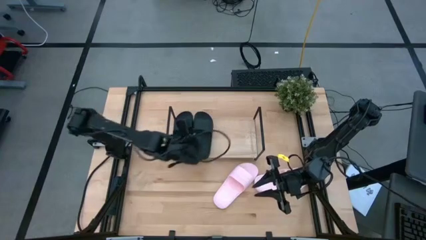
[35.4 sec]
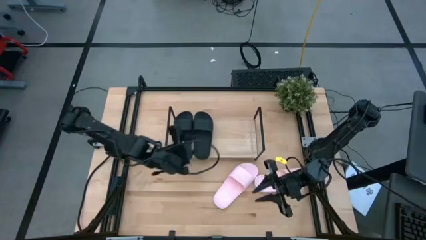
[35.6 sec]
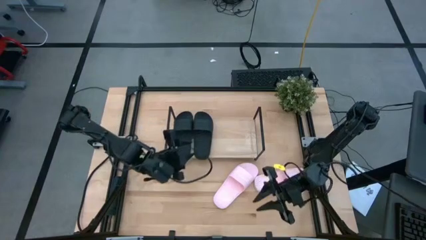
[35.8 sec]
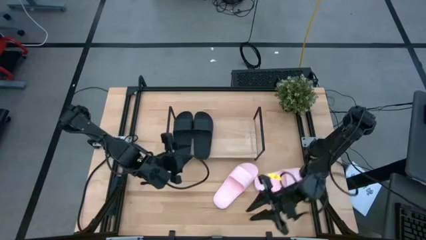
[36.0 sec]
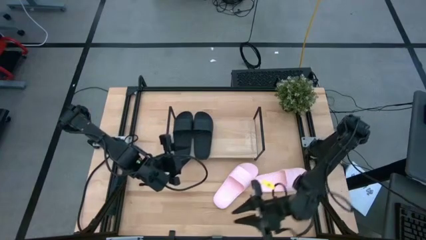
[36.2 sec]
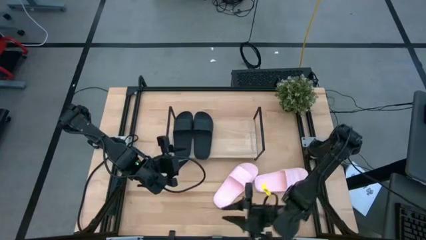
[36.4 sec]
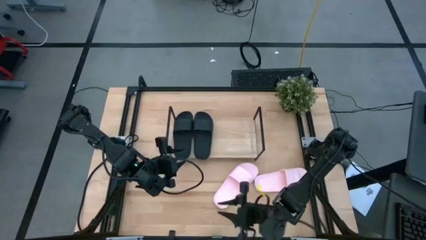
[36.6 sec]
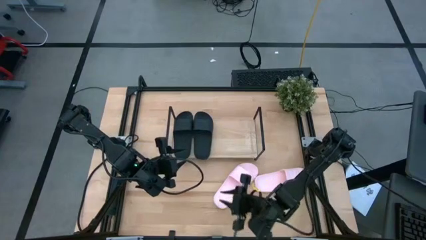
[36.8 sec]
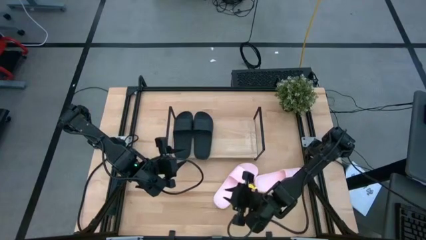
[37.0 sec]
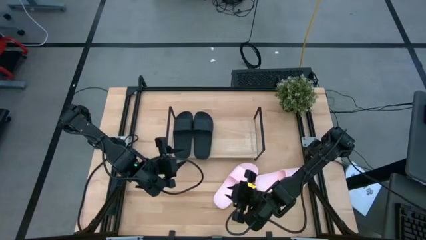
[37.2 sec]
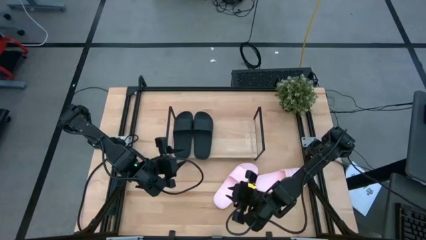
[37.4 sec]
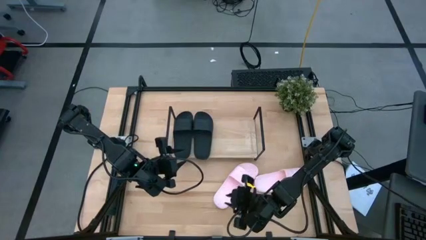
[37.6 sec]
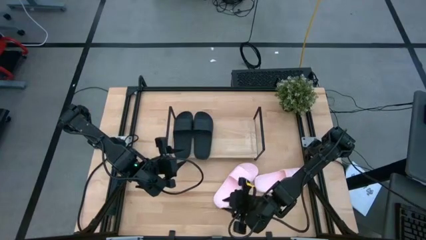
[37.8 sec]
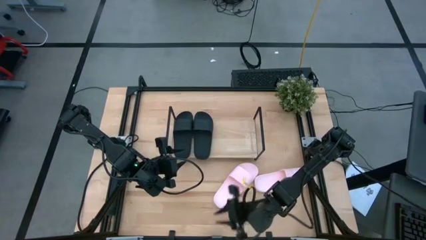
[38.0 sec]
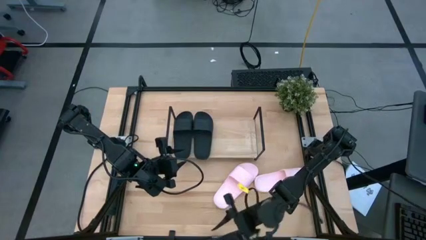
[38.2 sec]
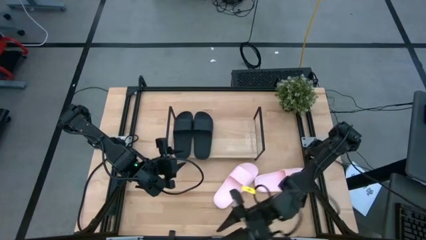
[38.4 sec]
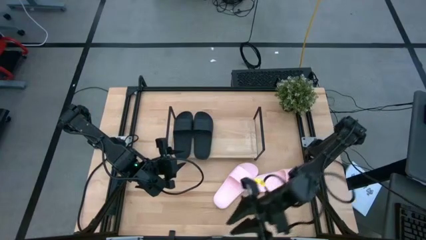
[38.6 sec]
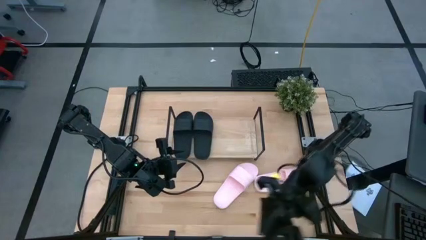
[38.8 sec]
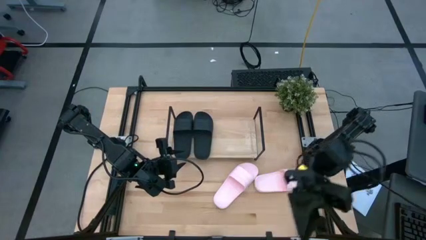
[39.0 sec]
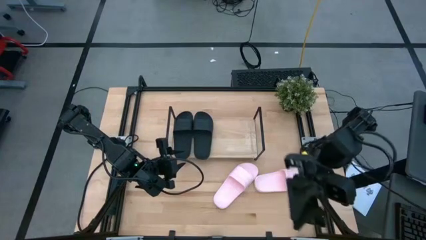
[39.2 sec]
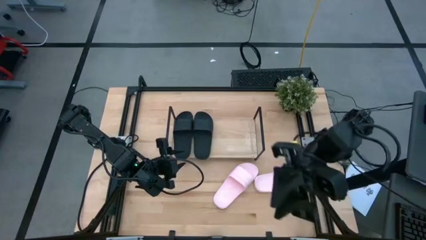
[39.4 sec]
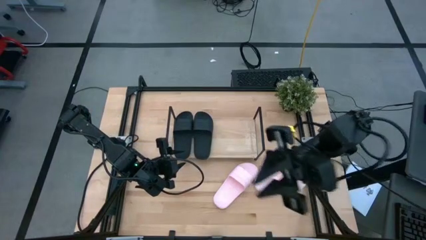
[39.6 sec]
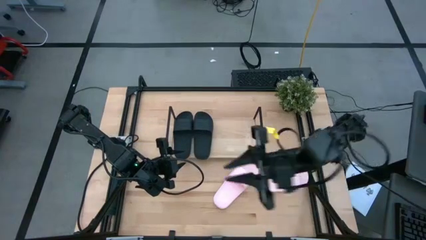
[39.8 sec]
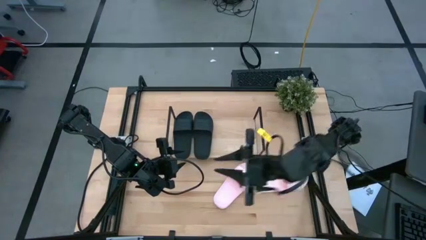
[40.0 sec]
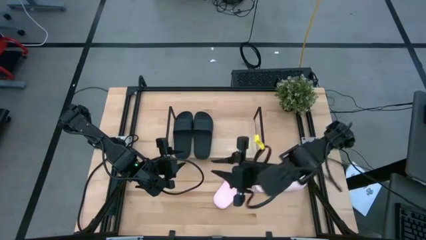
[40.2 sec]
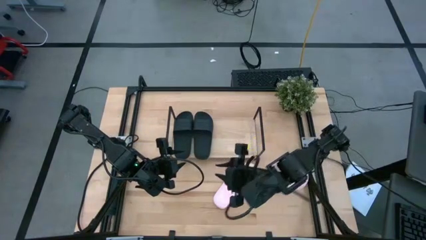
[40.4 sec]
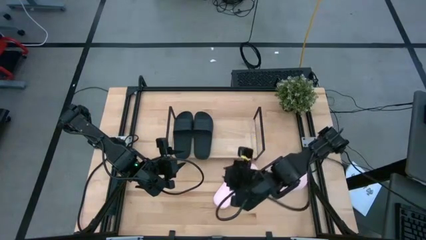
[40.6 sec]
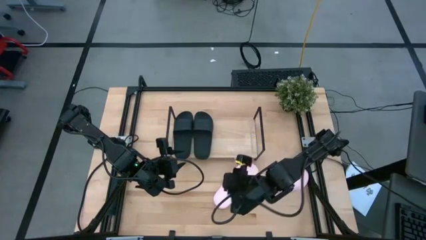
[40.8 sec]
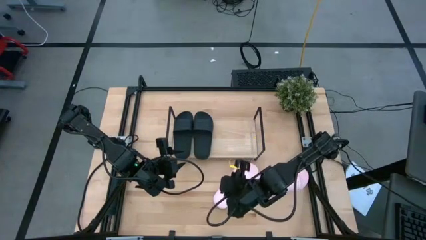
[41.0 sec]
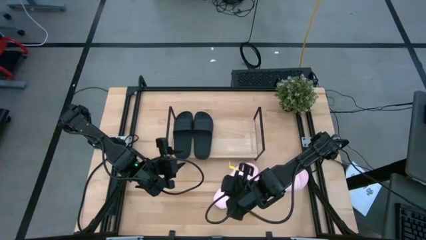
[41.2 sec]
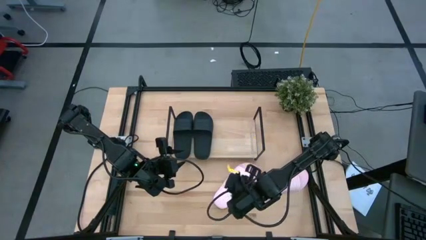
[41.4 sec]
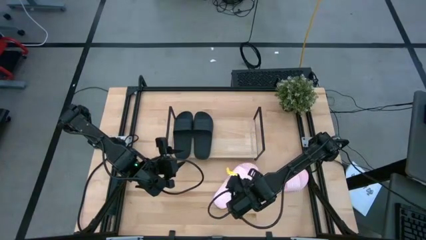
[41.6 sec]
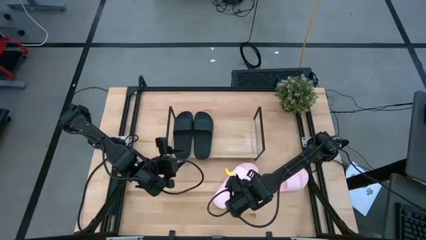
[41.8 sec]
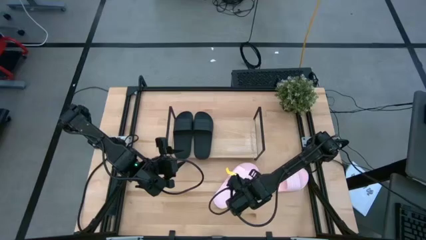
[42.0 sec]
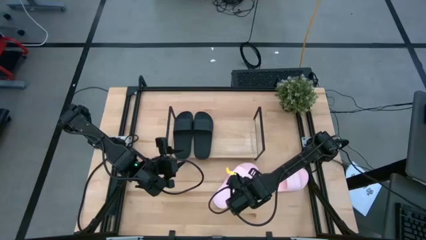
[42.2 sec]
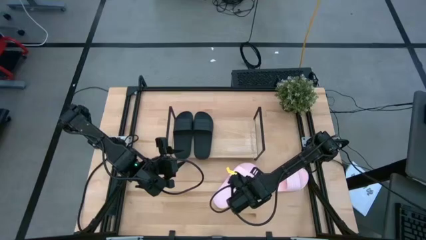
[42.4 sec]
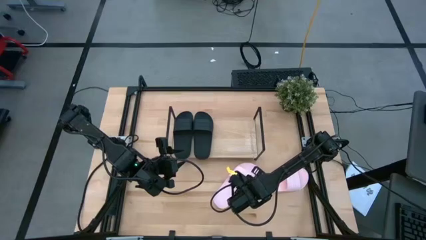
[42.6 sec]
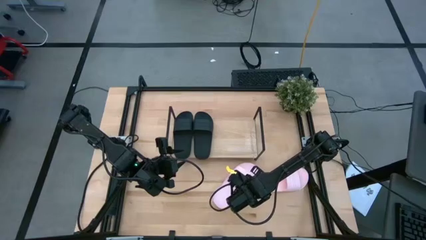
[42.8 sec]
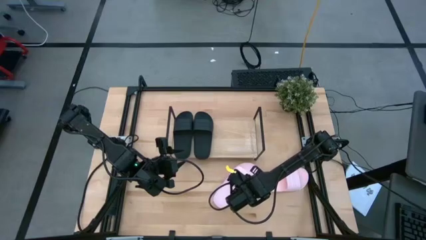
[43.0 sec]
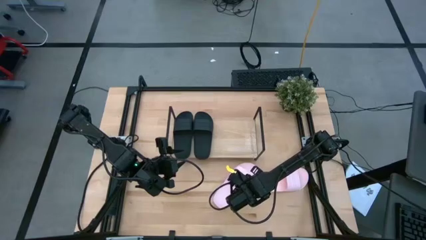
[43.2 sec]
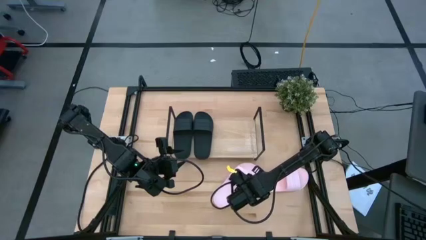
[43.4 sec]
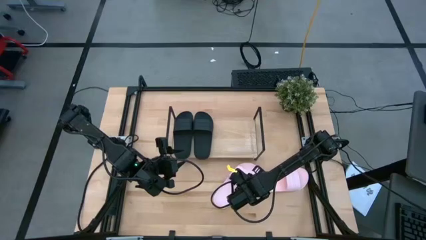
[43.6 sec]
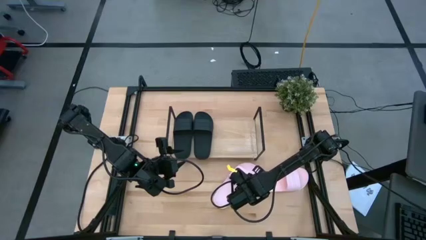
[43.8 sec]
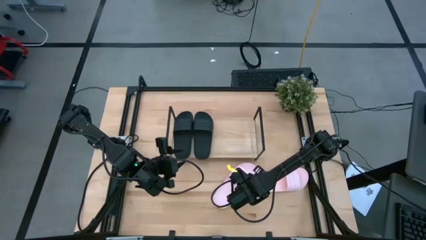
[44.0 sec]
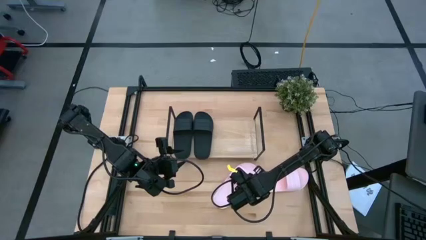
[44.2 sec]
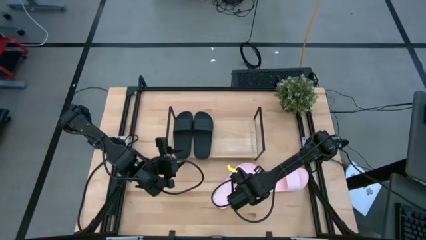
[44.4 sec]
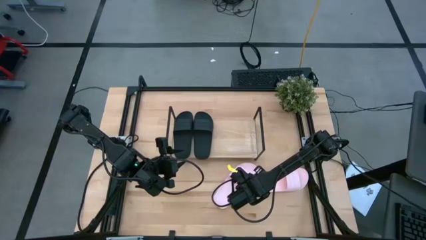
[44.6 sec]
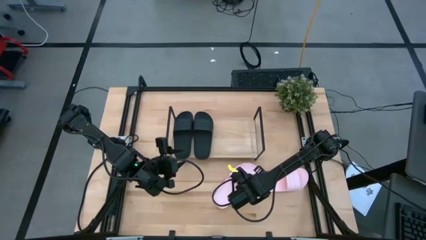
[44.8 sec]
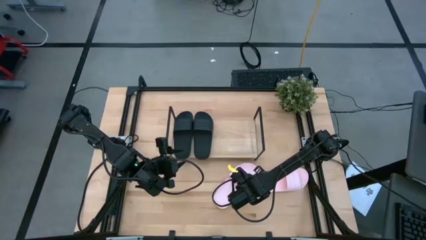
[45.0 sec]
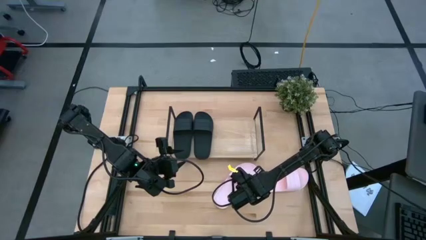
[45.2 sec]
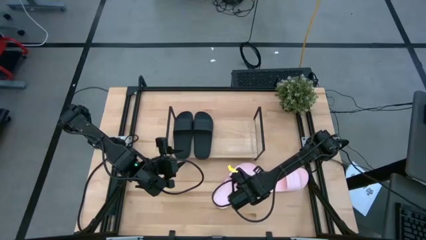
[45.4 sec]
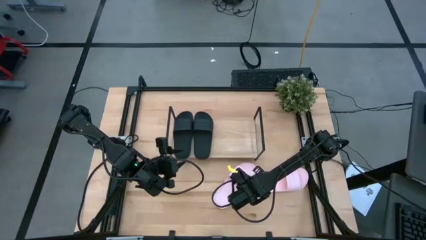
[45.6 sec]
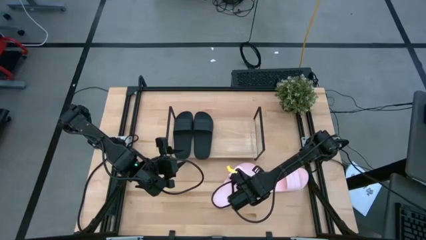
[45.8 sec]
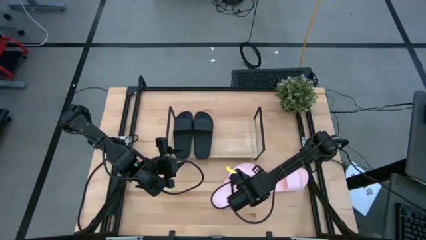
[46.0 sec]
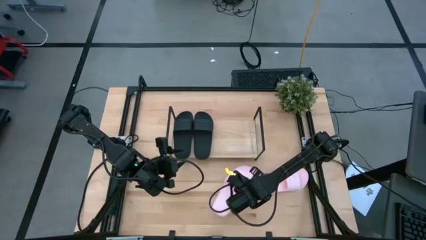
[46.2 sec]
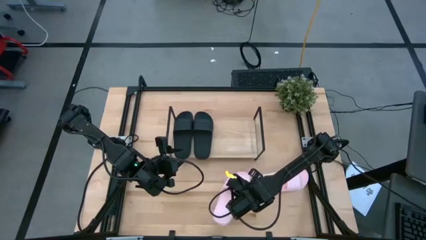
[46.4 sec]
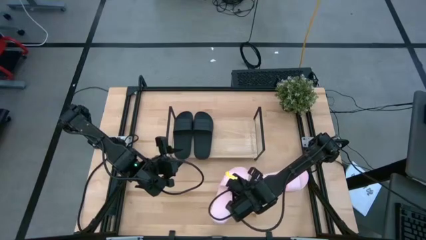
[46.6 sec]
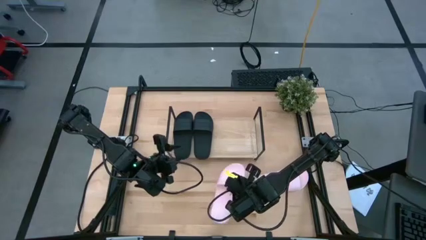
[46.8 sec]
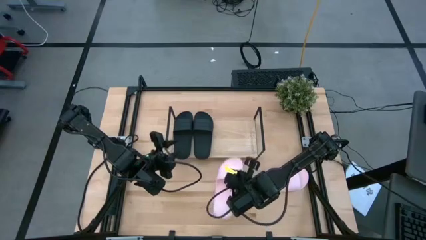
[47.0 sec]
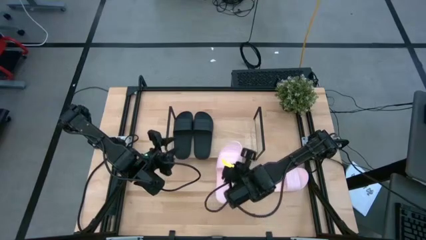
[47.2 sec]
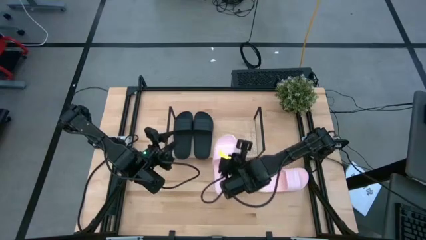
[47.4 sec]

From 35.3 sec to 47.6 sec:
Task: Pick and place slides into the shelf
Put the left pink slipper on the shelf
